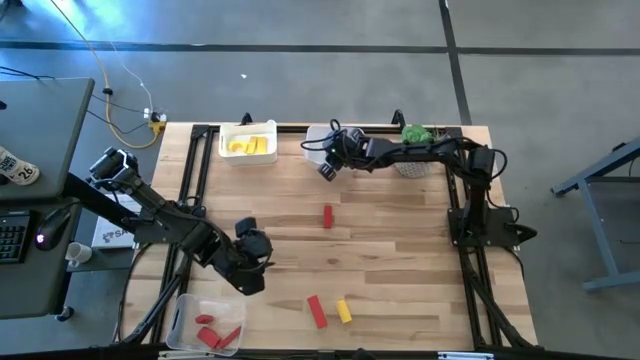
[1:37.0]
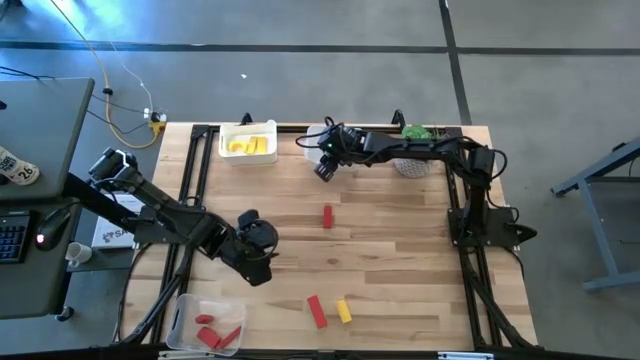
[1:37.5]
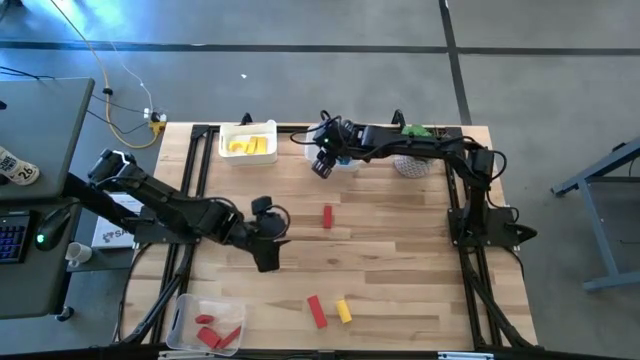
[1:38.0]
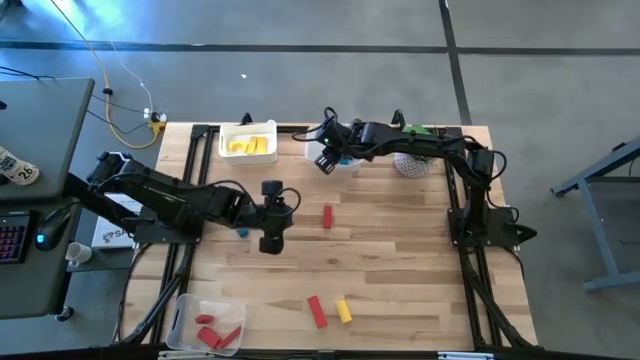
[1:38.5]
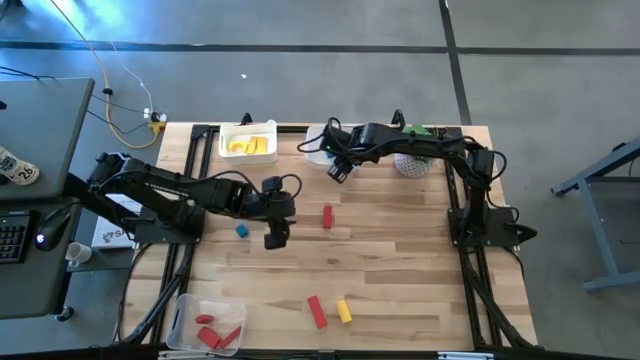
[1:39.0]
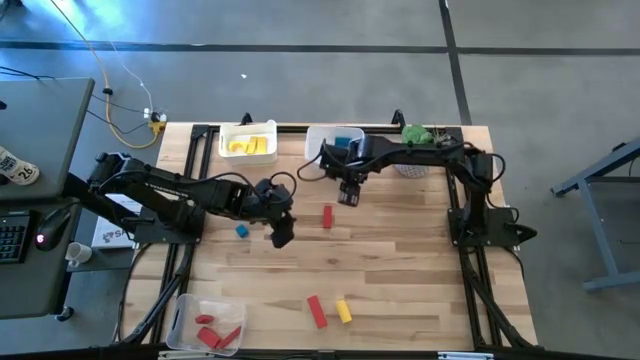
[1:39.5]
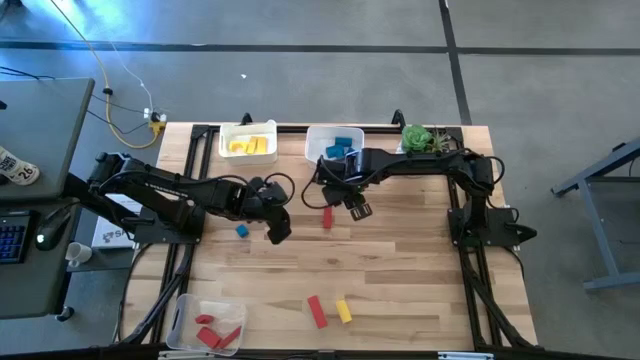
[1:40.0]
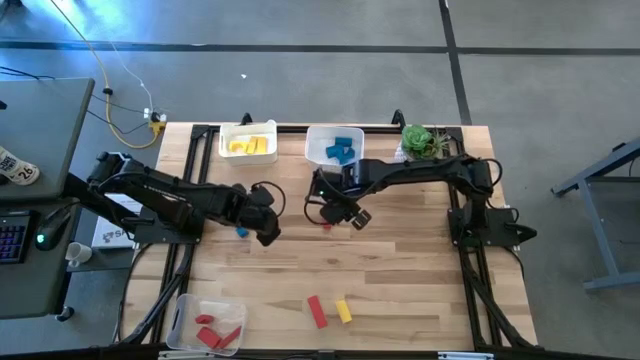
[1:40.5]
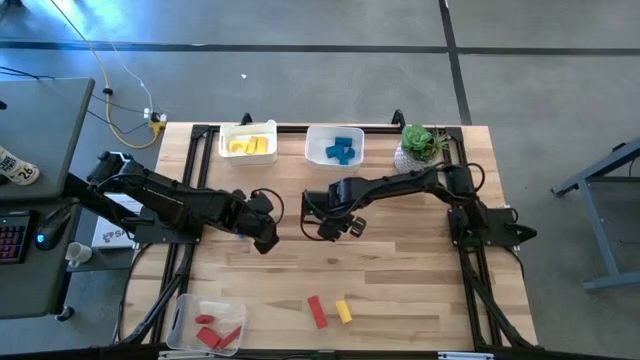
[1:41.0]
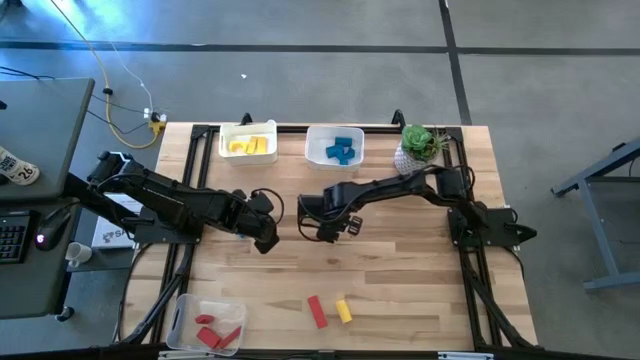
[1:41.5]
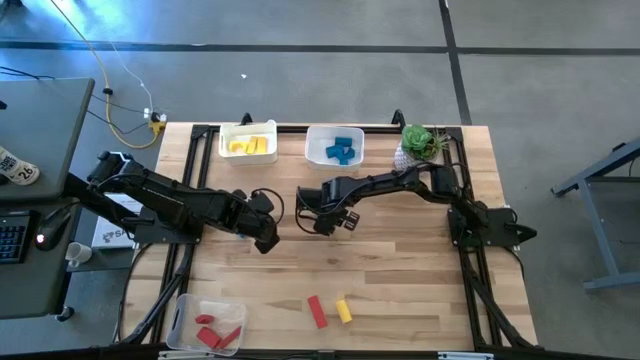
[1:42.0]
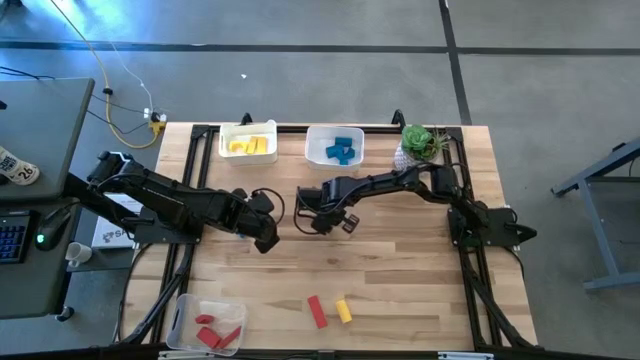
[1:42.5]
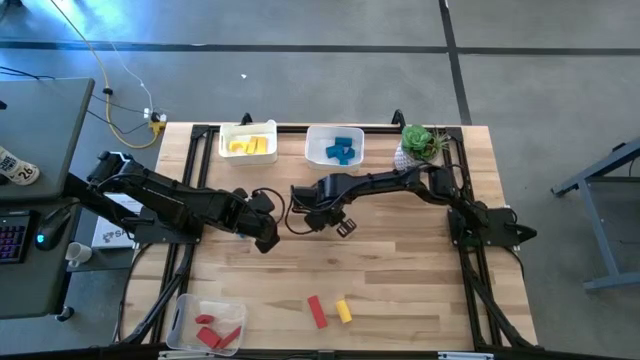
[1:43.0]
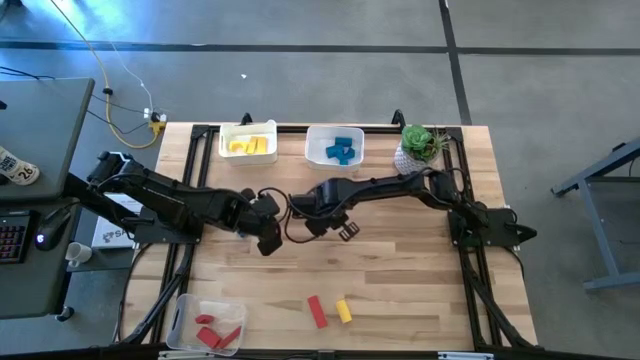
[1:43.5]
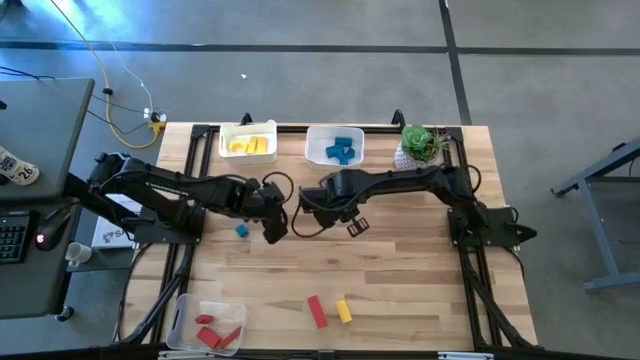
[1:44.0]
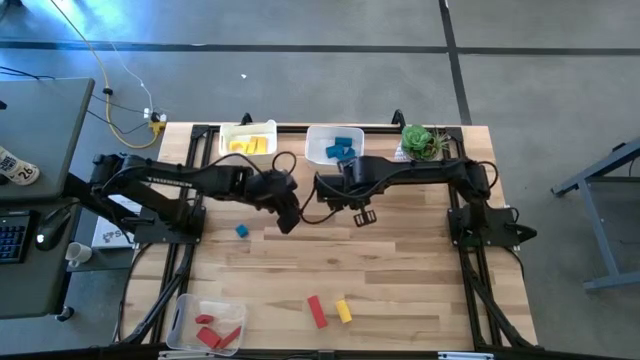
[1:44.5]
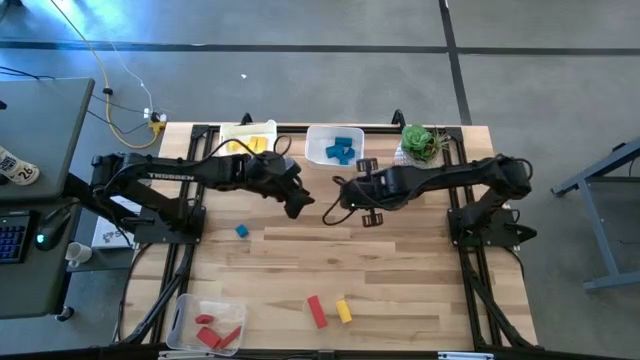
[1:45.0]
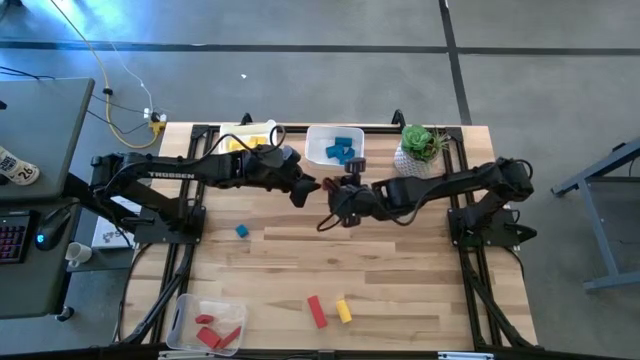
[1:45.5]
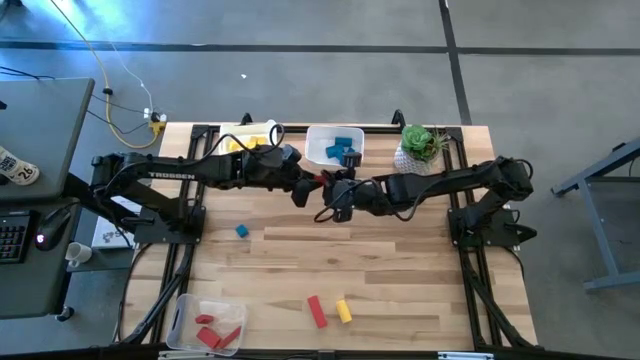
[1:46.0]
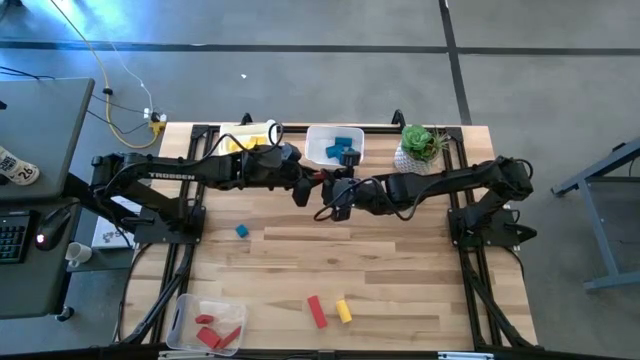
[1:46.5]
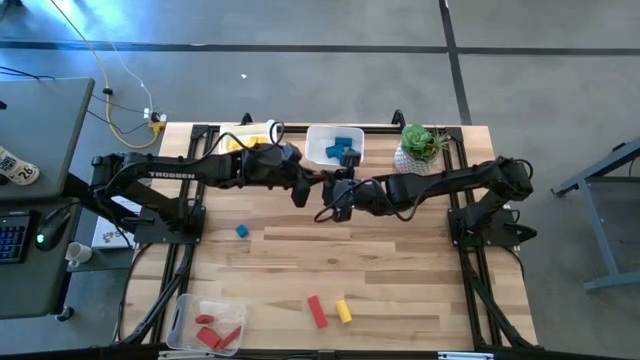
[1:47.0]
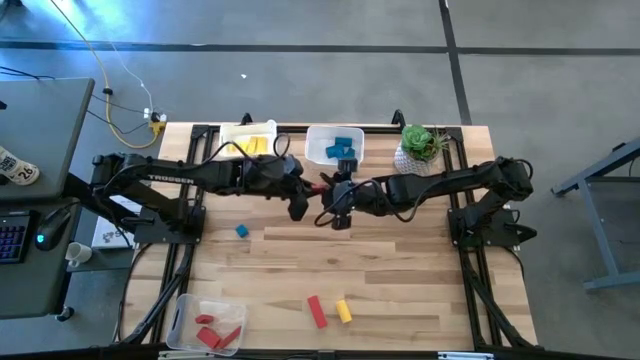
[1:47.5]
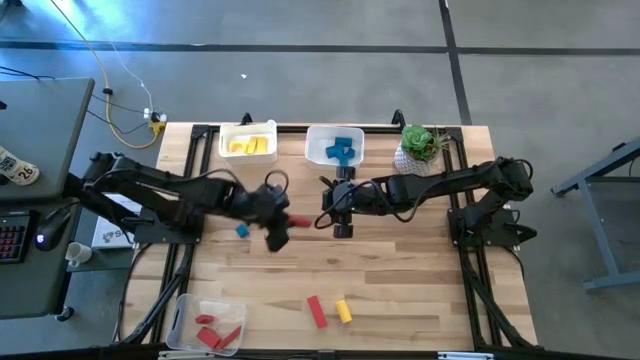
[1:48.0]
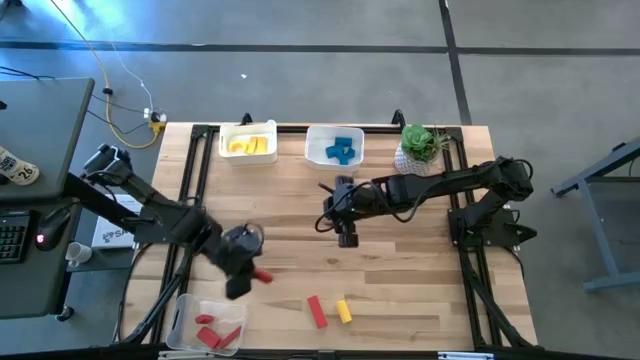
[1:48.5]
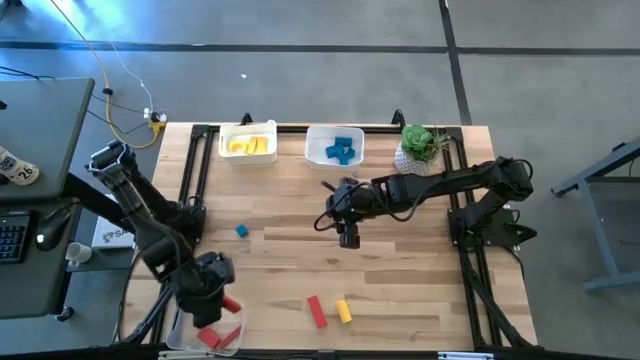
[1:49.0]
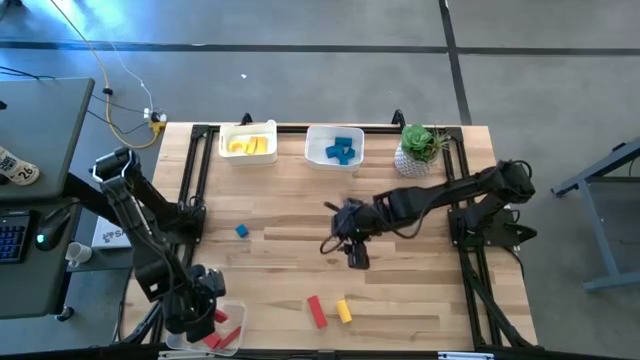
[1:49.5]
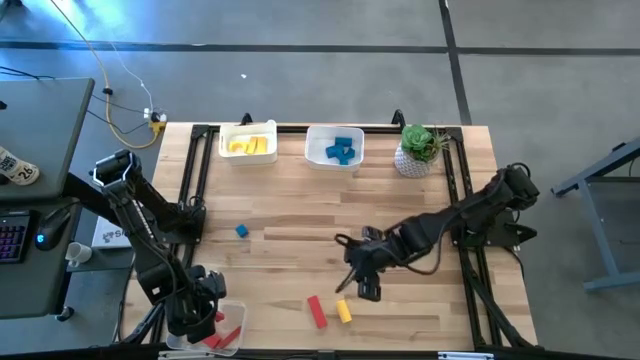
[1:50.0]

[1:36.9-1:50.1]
Task: Sort & place blocks by color
Put the red block into the transparent bin

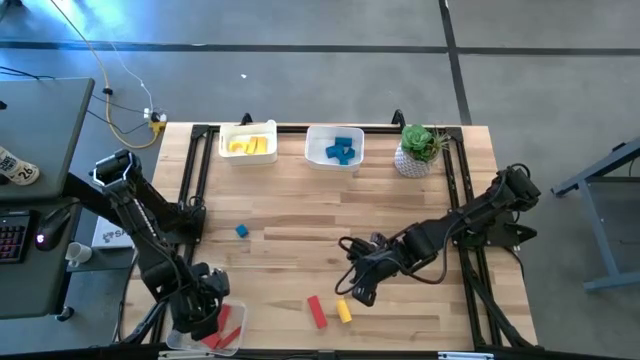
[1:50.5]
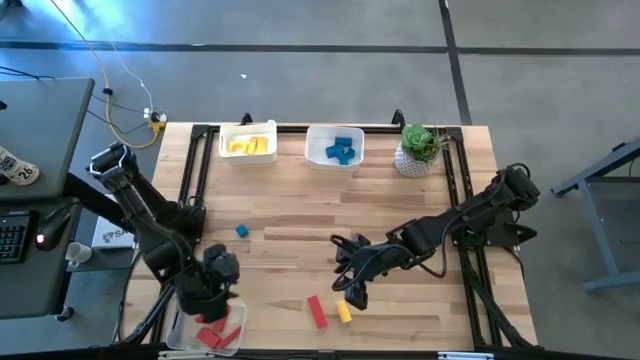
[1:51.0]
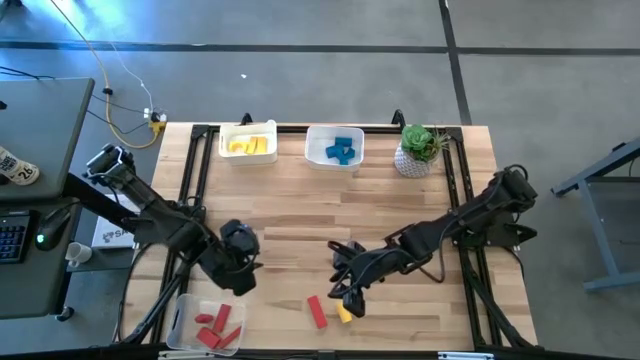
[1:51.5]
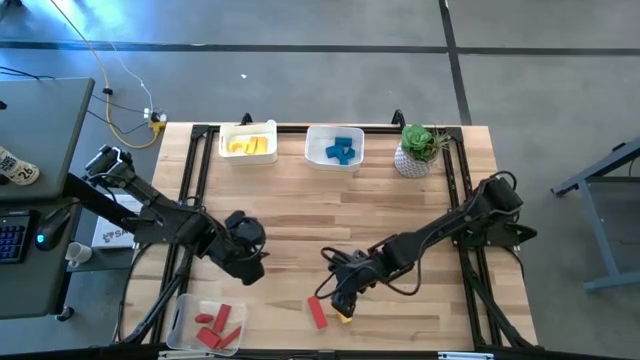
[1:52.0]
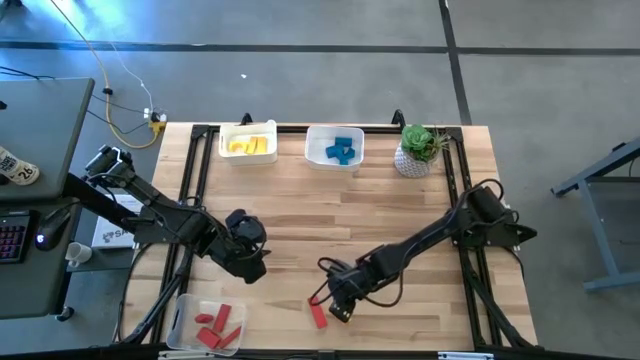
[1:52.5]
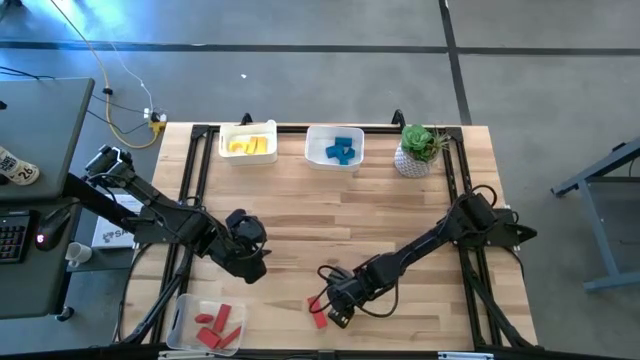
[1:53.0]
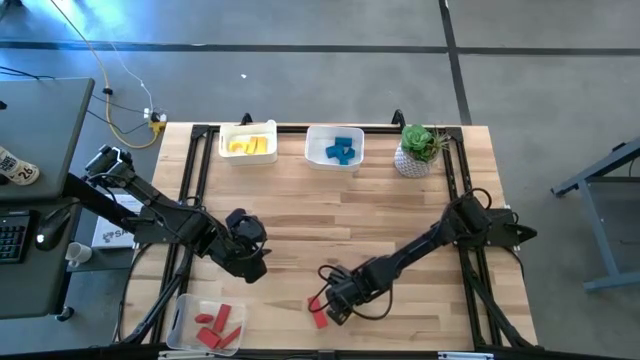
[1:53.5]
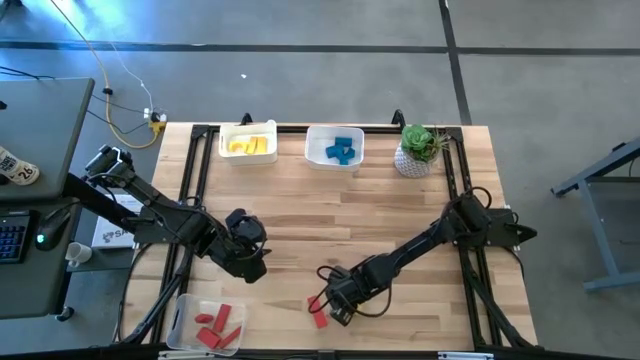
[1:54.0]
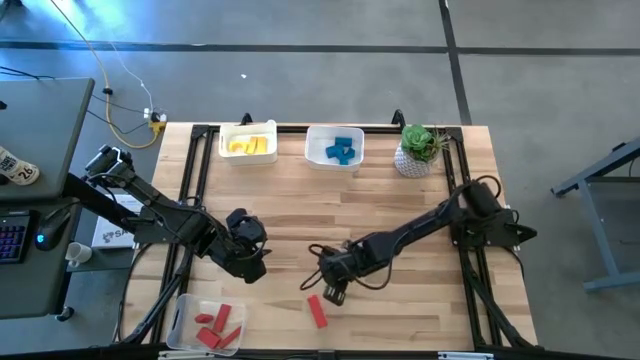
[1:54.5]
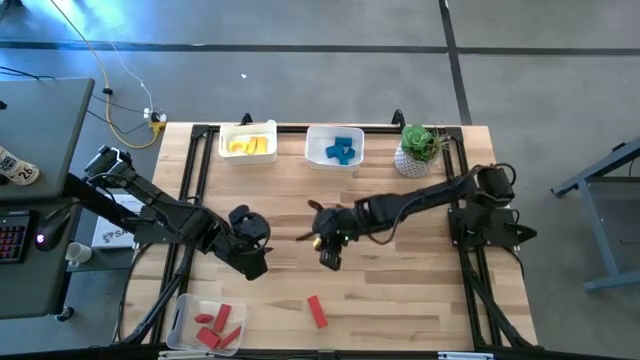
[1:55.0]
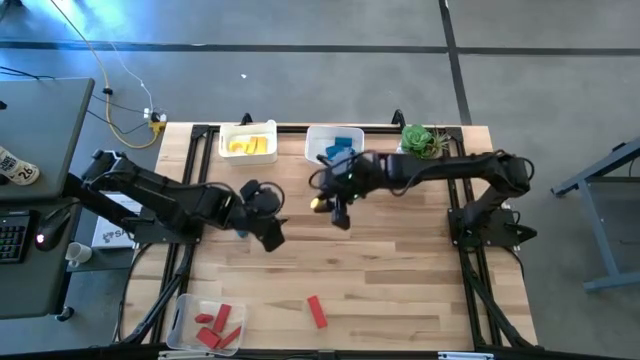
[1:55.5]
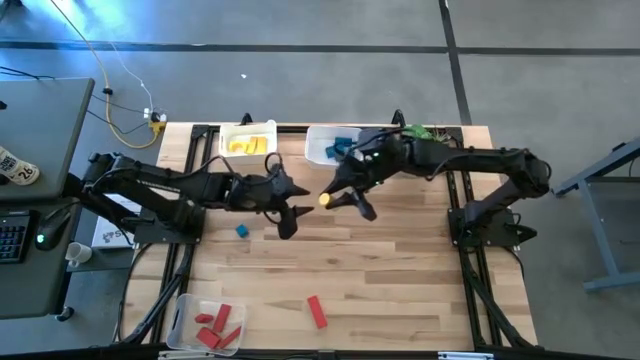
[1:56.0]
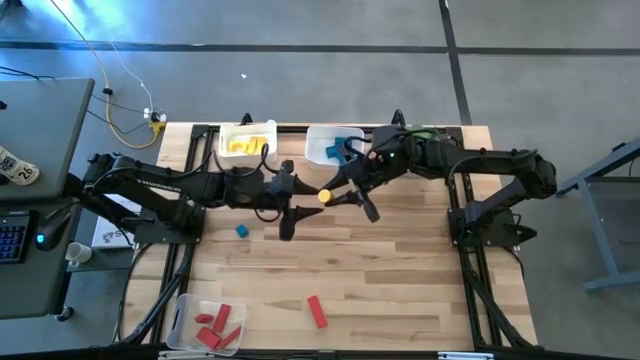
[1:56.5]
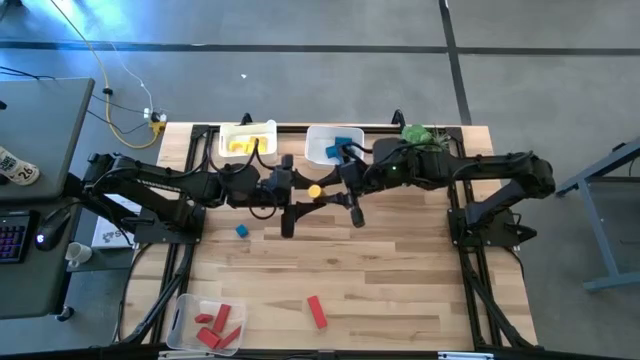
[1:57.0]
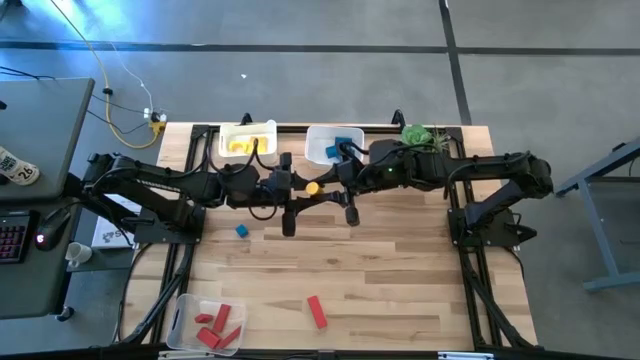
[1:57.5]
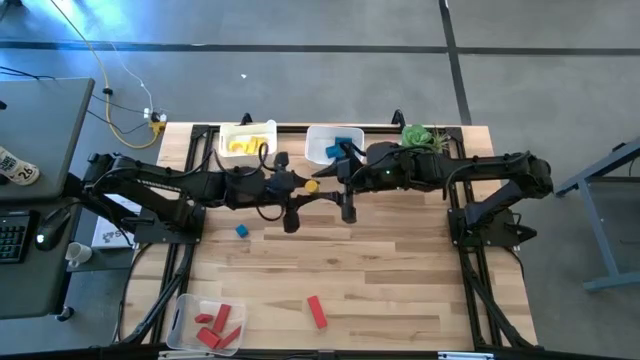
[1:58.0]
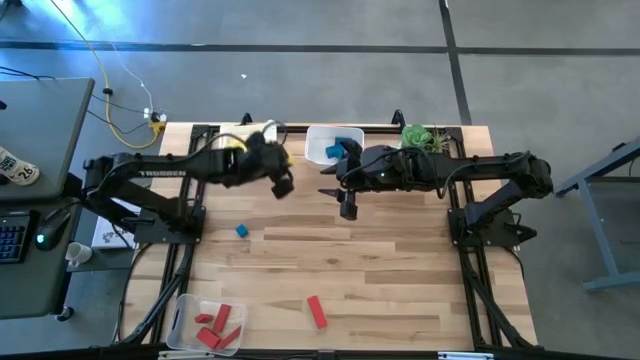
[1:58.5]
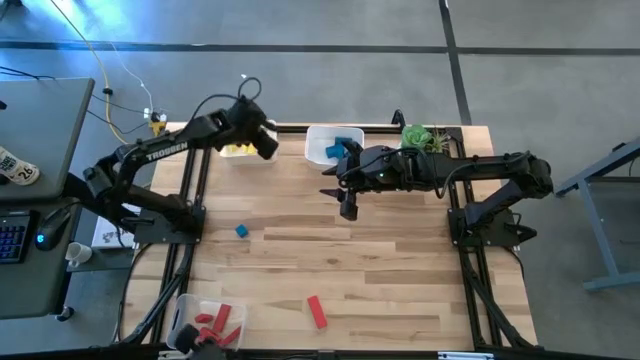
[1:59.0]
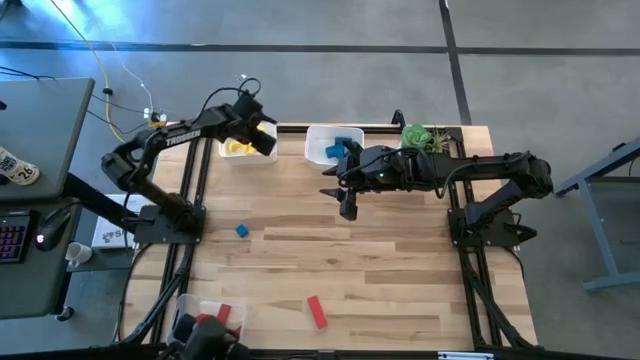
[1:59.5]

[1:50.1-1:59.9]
Put the yellow block into the left white bin
